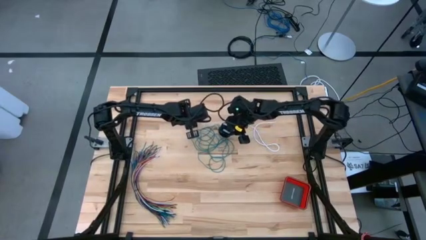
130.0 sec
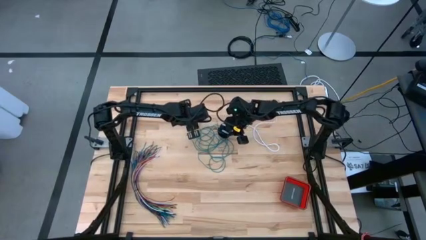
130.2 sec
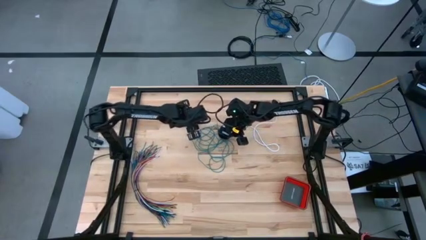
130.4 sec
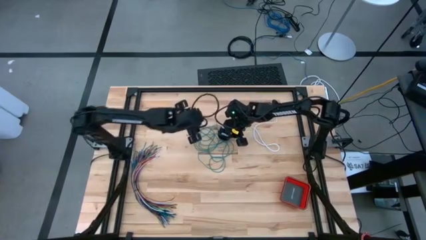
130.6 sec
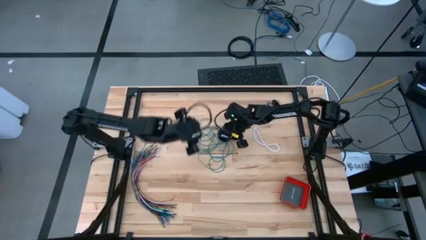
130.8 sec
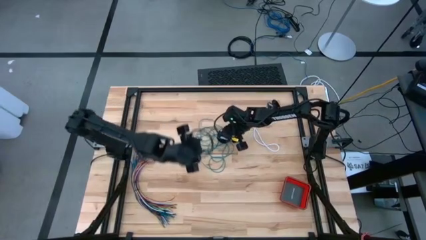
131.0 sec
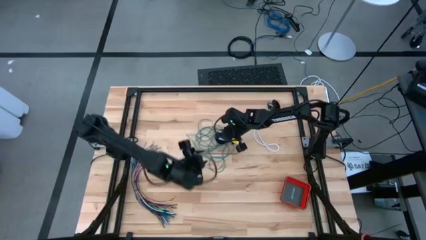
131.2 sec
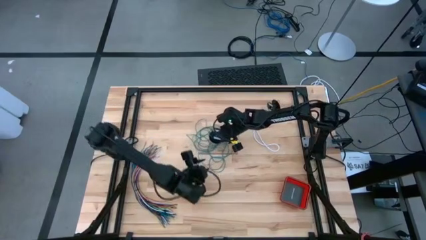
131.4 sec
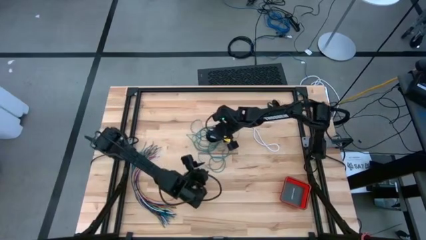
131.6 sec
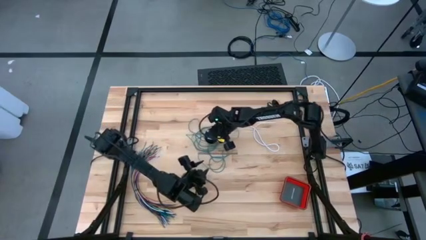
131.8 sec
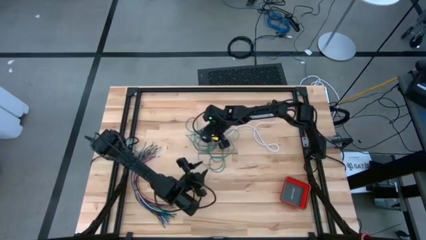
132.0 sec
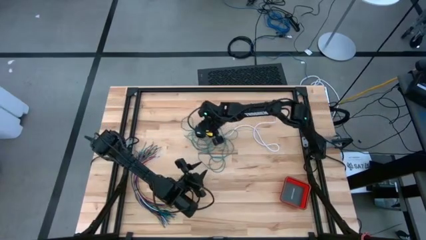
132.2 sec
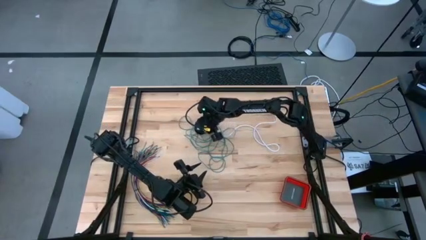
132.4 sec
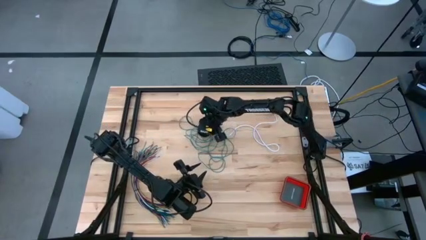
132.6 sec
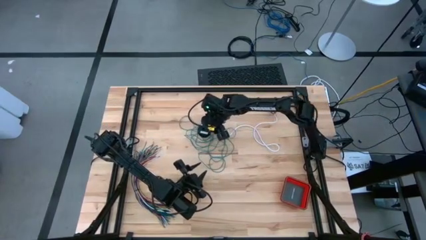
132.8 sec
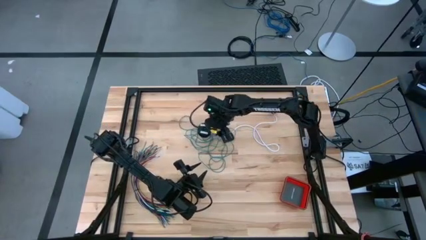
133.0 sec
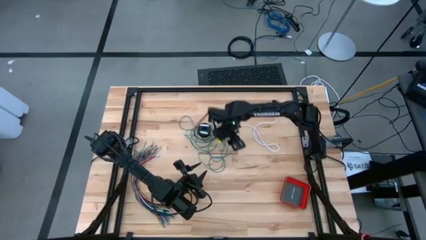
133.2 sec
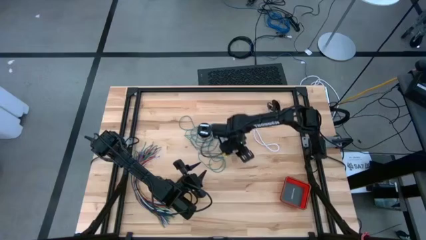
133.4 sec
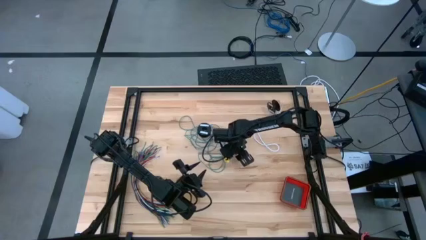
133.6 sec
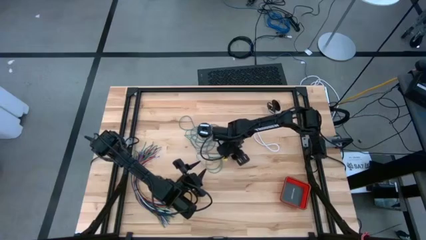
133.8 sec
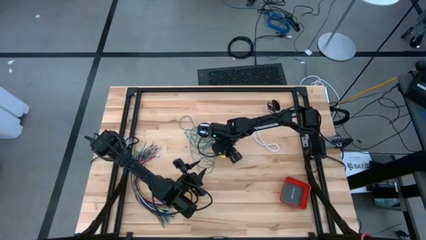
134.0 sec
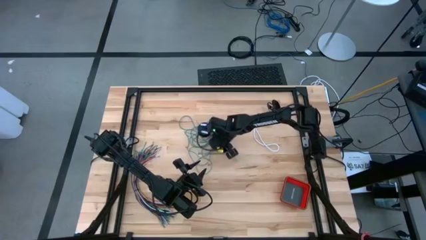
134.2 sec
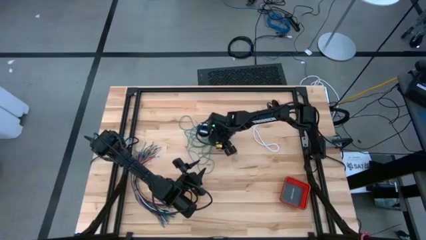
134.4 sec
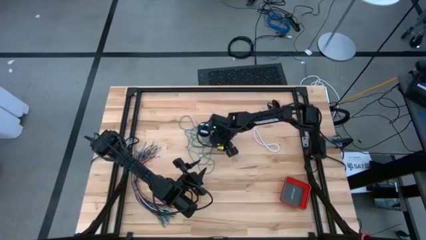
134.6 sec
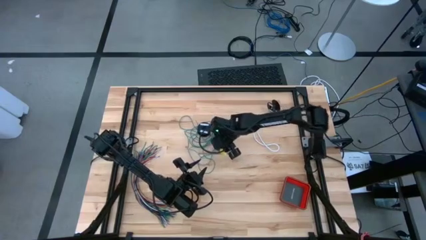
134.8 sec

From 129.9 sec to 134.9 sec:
Task: Coil cords
Put the green wire and the spool on the table

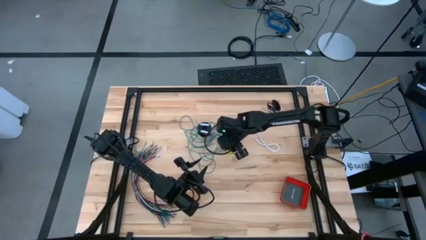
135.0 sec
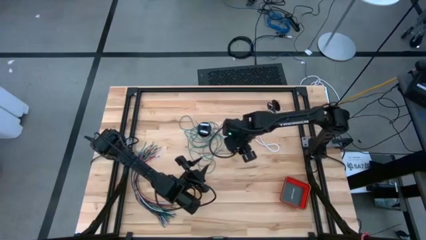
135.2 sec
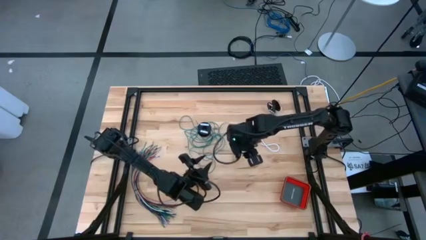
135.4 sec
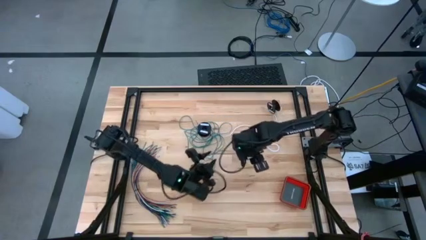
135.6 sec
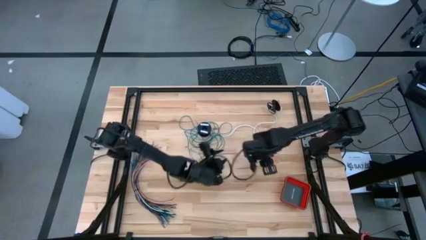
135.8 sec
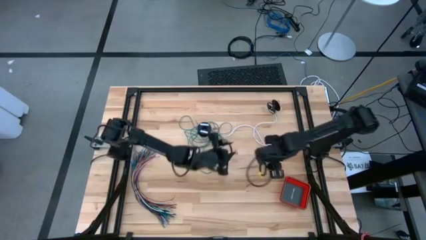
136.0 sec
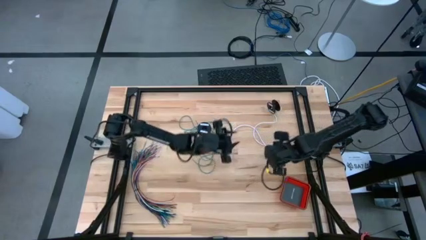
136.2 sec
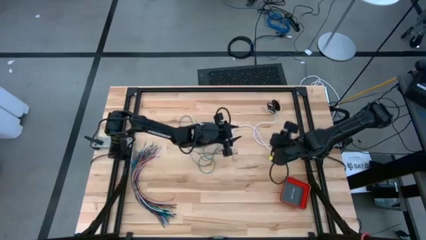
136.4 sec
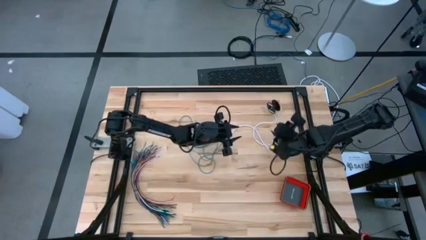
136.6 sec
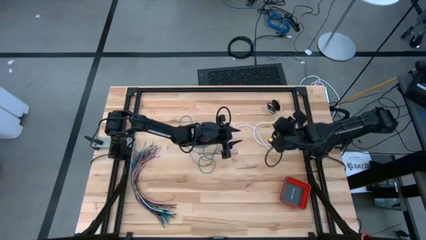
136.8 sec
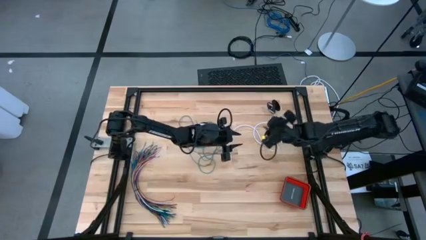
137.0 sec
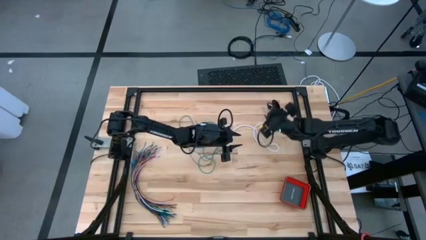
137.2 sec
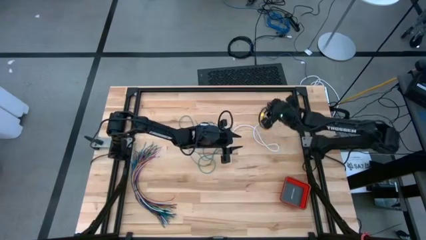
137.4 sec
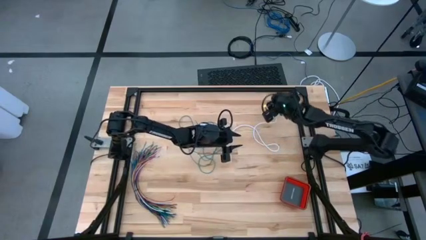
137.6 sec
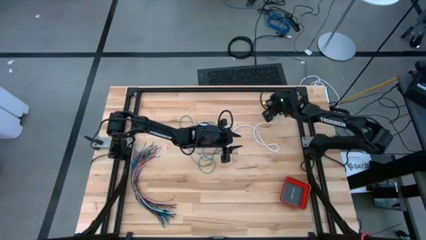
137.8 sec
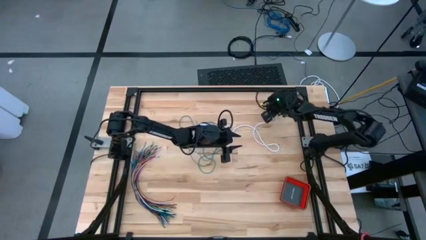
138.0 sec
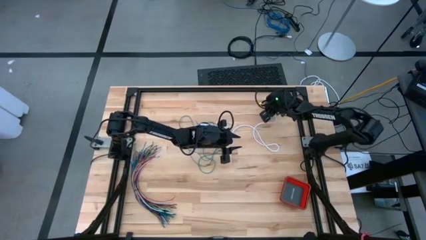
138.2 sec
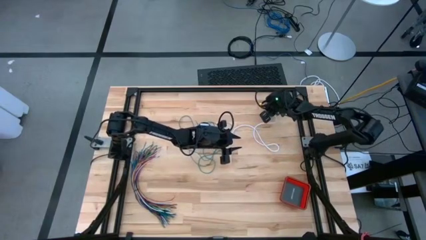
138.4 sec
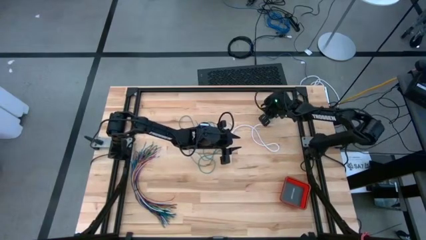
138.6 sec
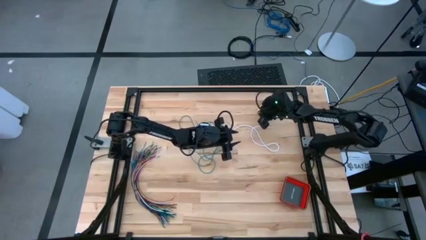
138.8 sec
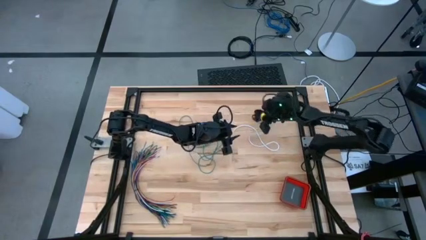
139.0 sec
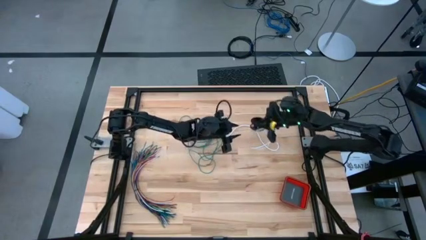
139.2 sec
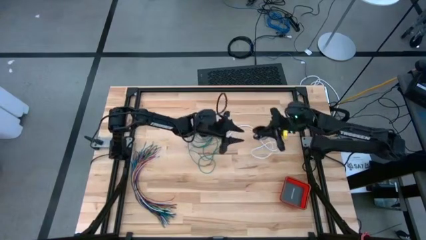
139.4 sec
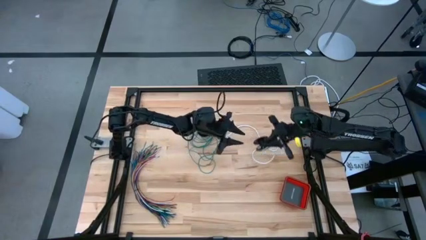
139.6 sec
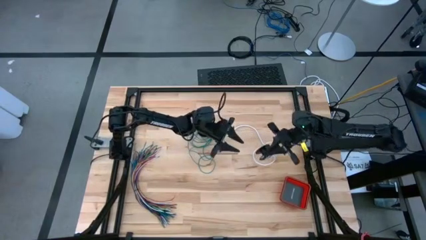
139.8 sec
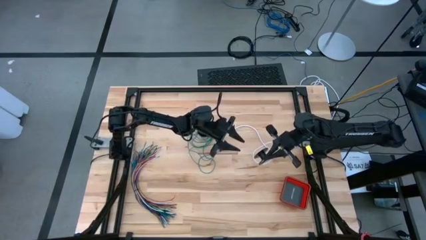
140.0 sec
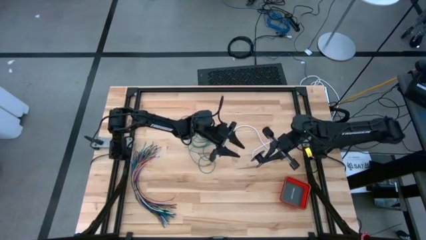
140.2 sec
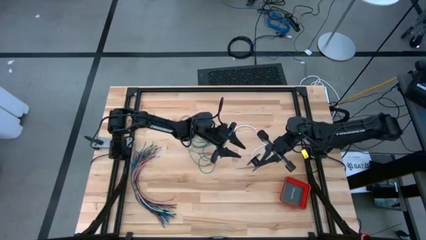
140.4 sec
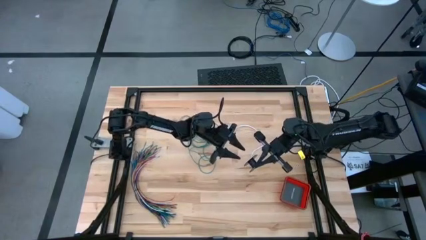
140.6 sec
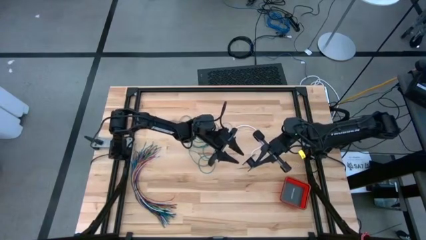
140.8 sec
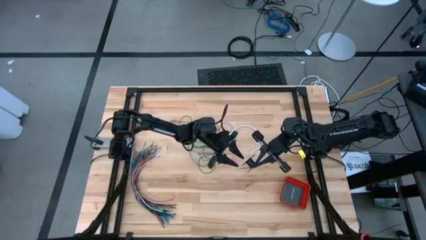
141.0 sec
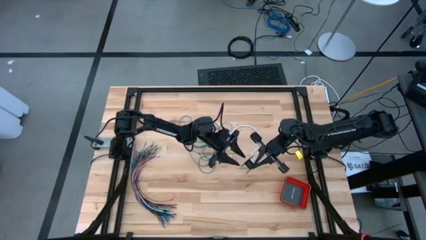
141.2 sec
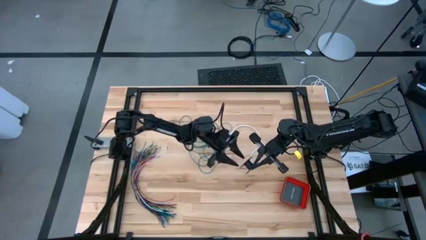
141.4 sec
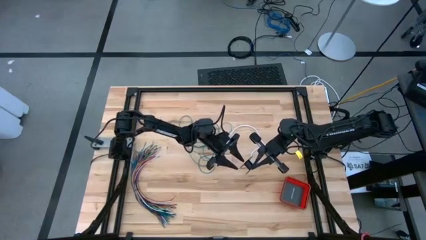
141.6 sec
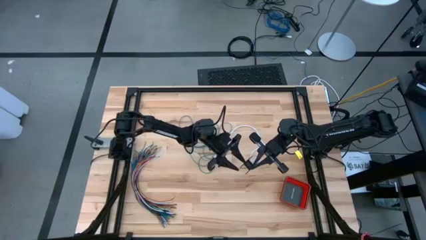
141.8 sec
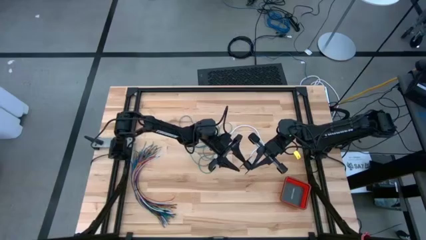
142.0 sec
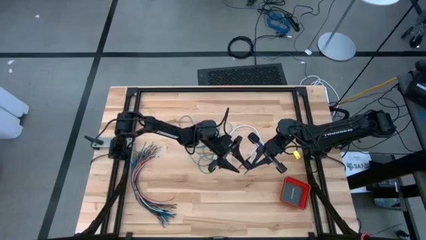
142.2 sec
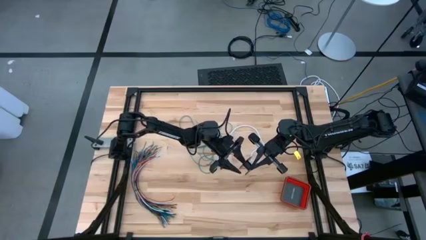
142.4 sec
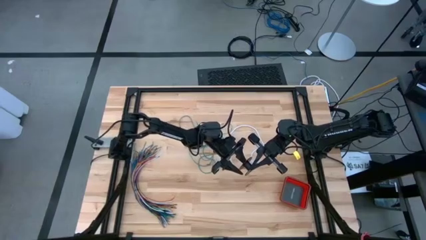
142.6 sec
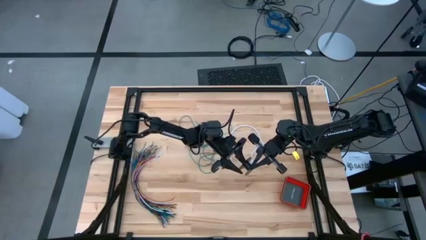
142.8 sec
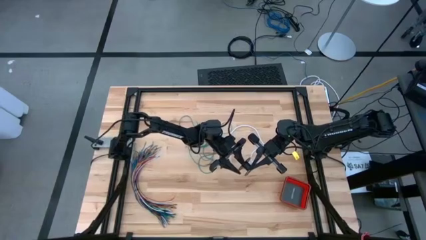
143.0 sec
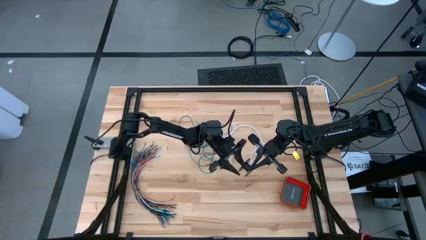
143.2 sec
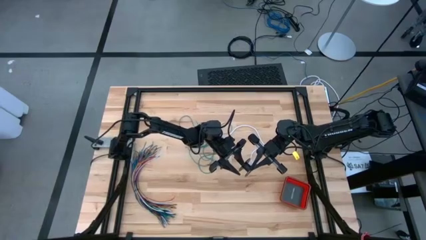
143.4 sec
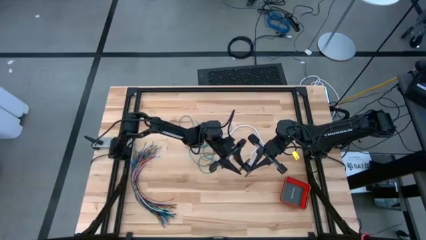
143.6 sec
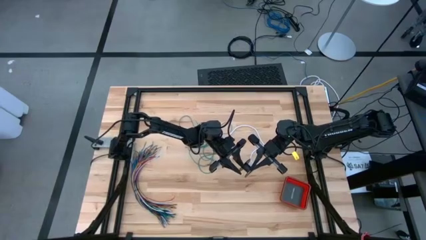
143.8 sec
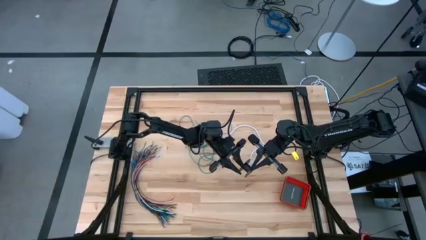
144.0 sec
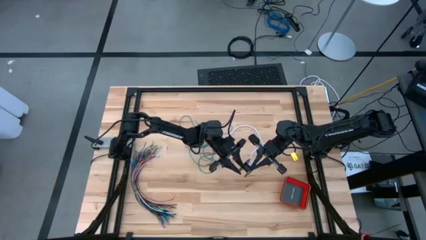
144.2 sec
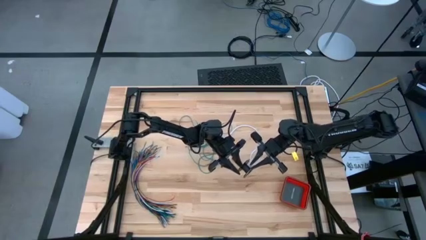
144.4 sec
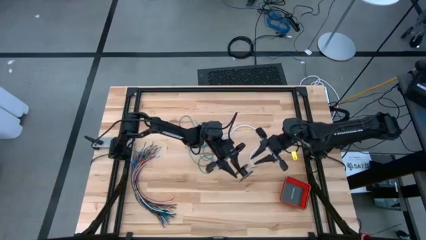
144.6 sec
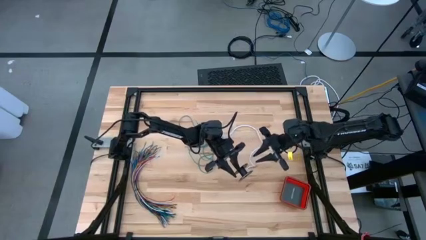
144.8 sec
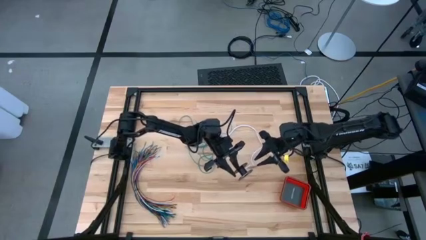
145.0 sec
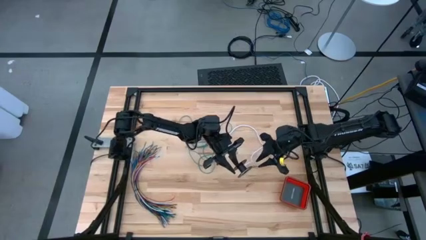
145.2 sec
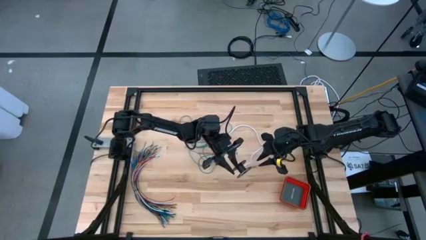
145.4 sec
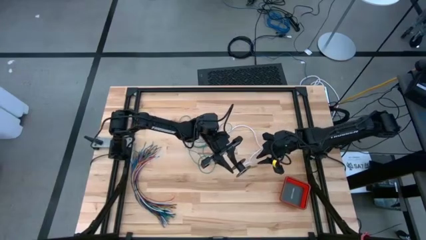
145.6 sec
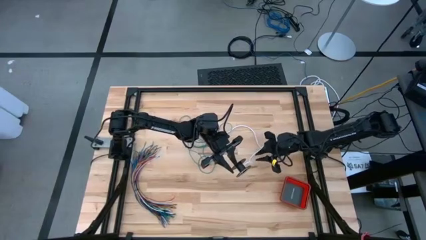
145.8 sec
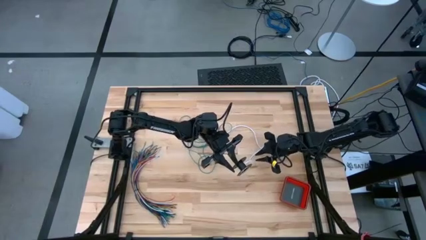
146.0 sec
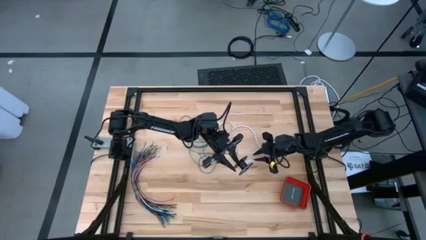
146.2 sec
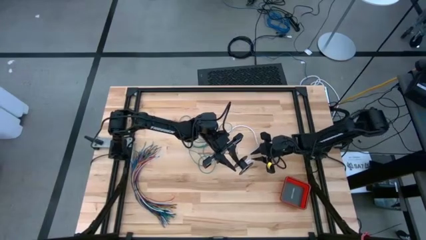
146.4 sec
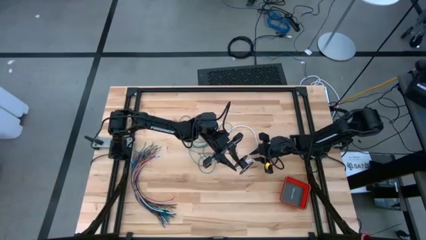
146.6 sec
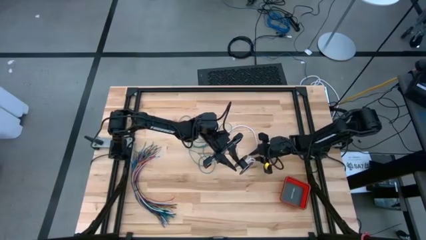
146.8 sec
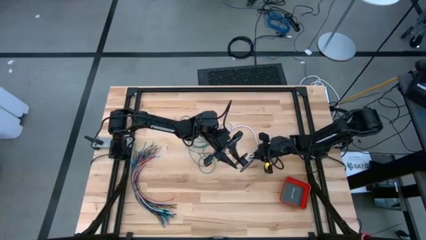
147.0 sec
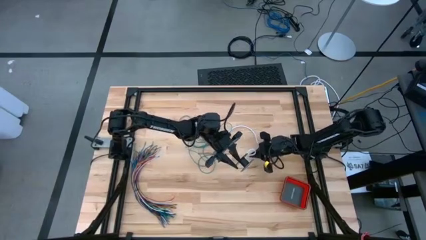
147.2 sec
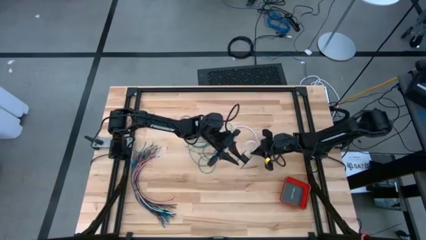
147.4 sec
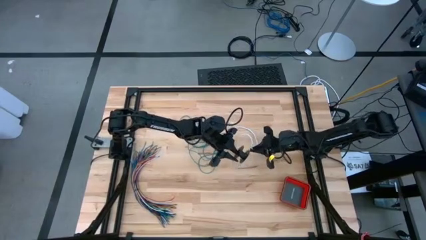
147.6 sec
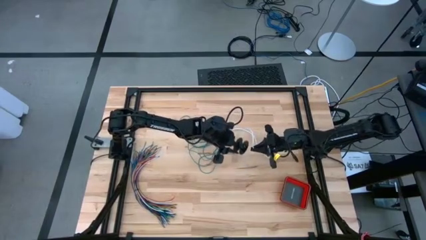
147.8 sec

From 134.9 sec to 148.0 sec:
Coil the white wire onto the spool

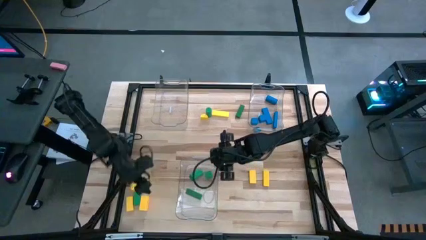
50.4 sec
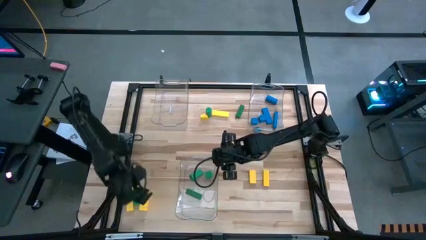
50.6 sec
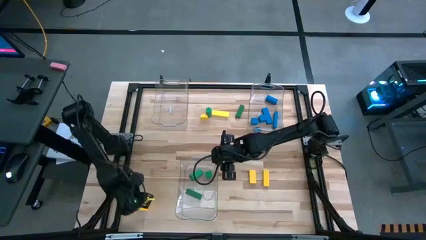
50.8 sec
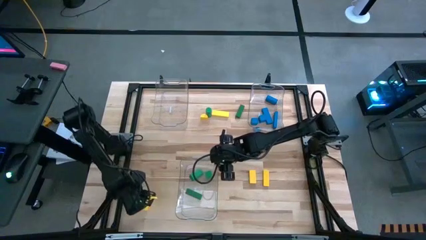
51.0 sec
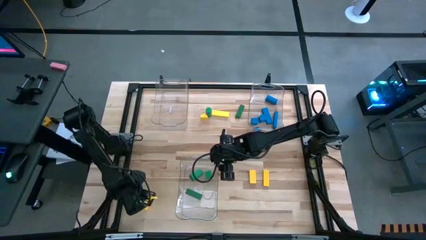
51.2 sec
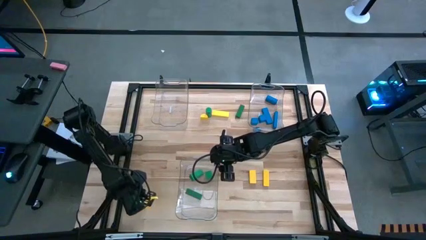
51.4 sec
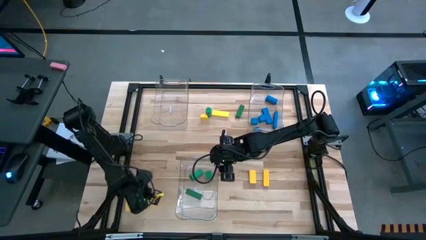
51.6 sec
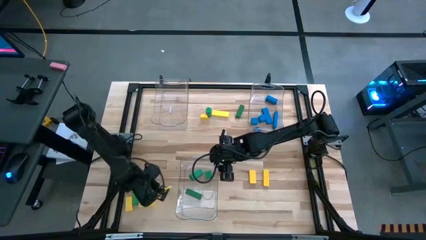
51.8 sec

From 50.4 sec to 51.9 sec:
Task: Sort blocks
Adjust the yellow block
